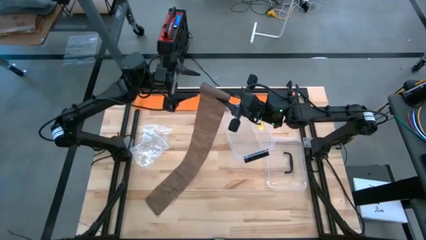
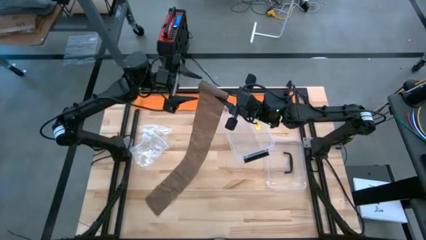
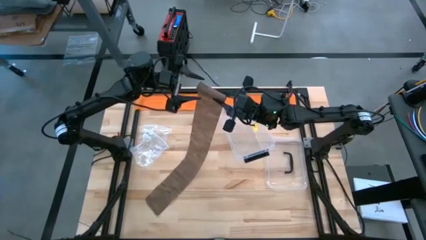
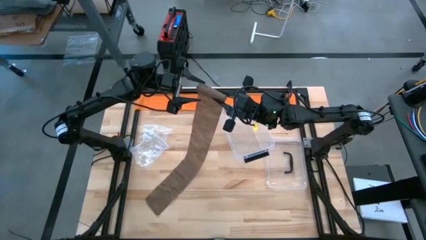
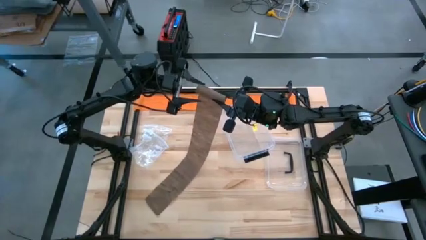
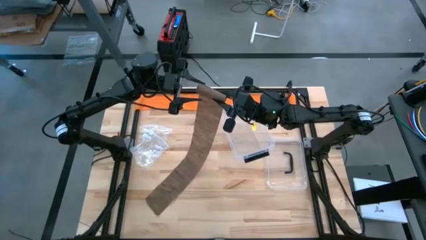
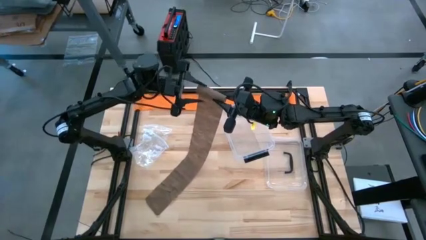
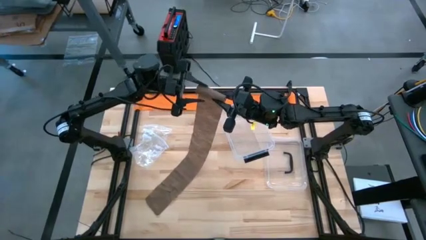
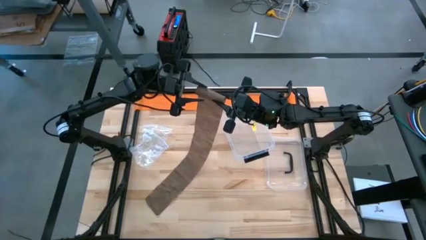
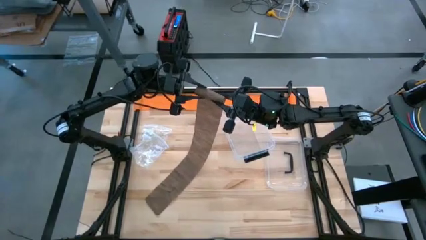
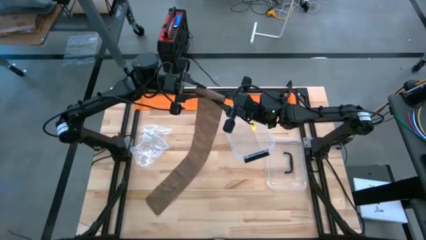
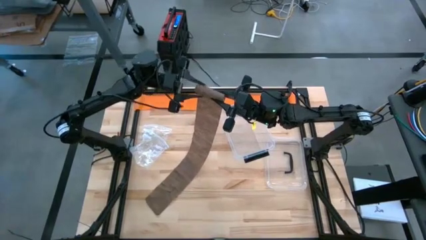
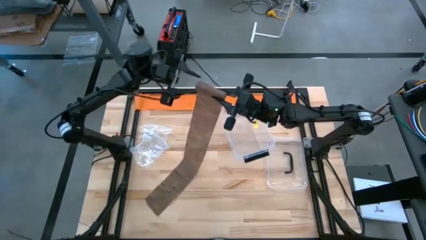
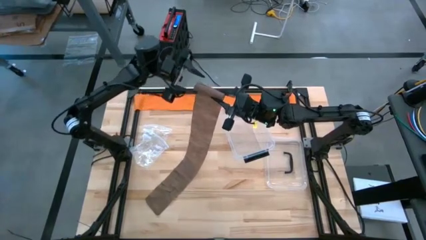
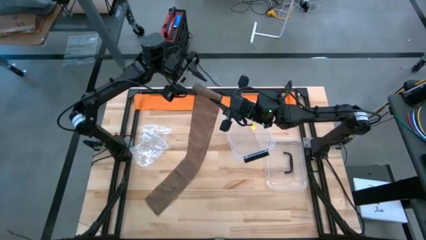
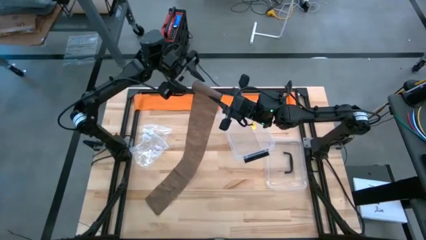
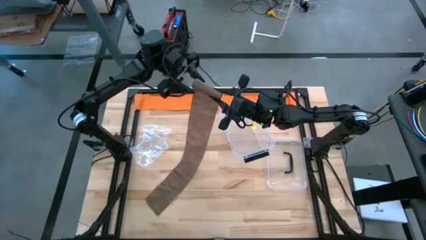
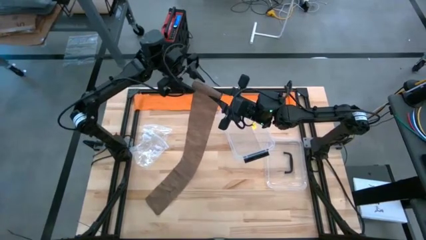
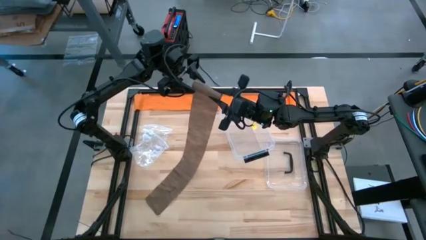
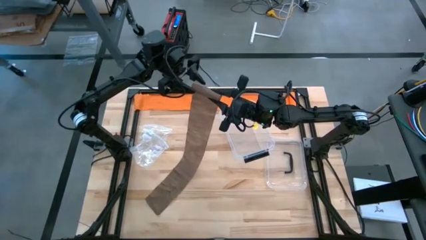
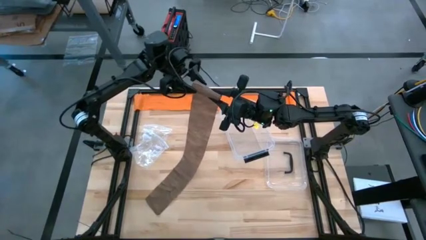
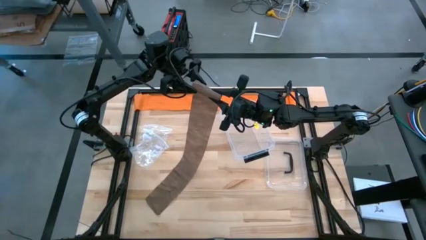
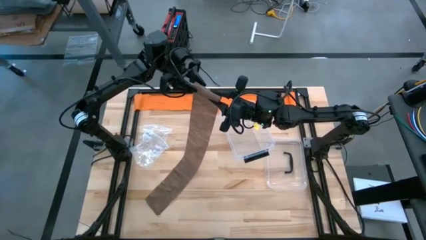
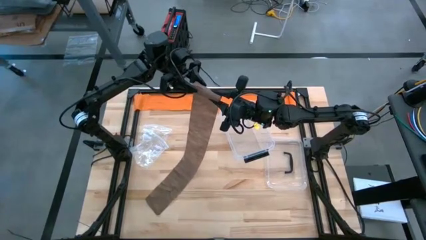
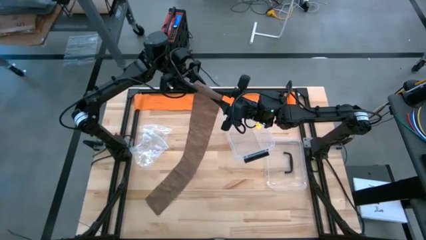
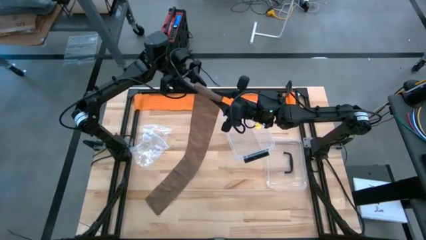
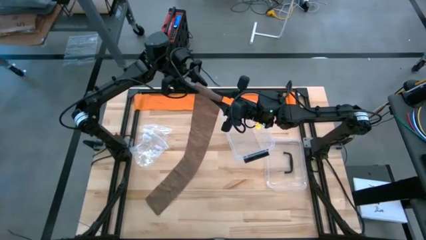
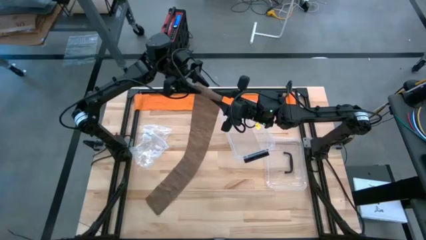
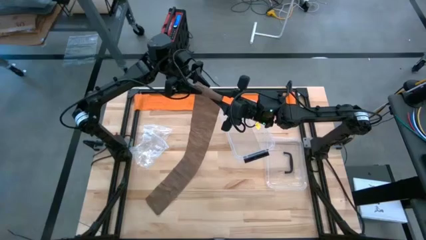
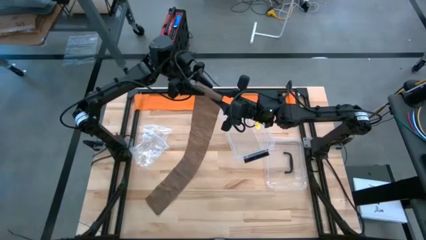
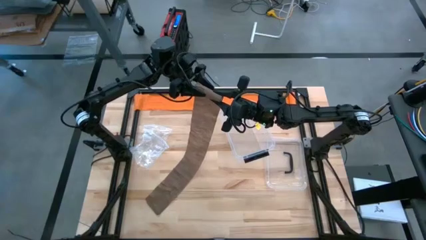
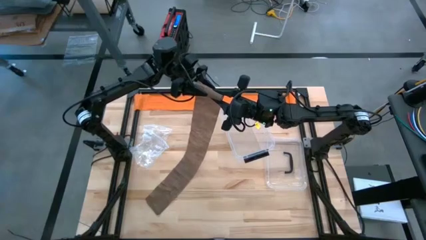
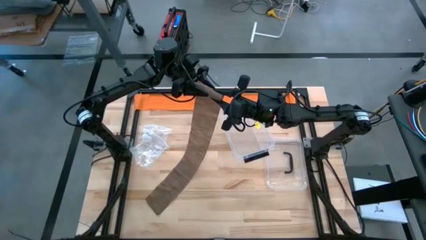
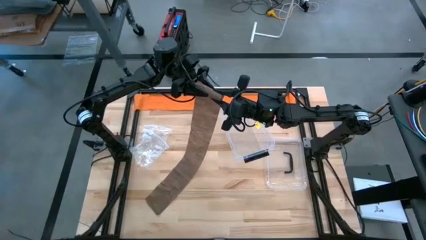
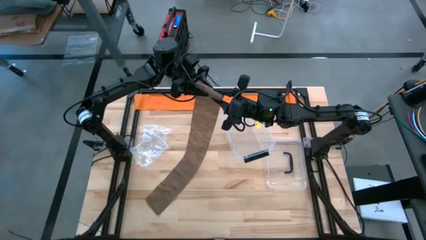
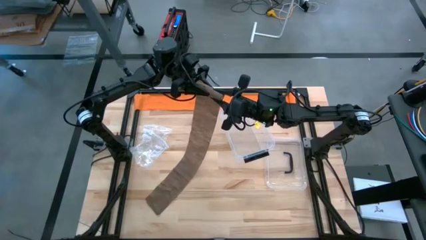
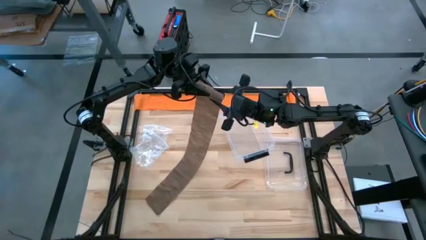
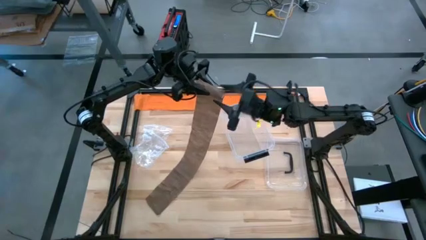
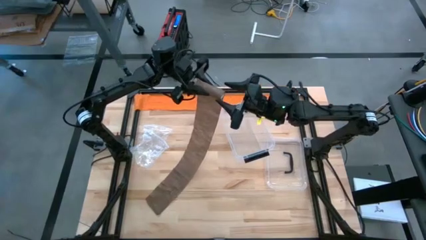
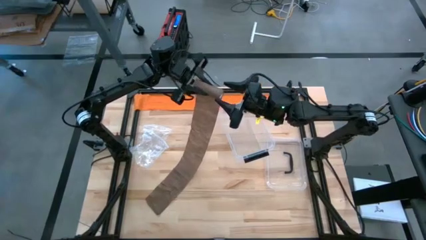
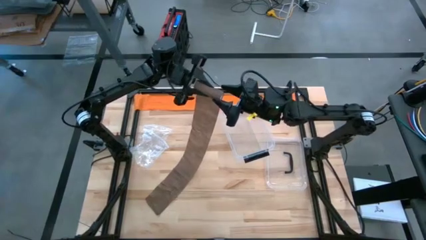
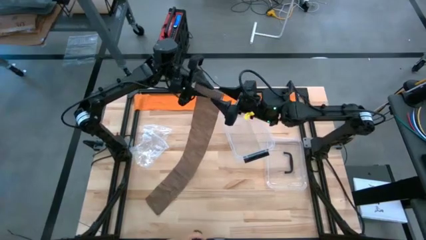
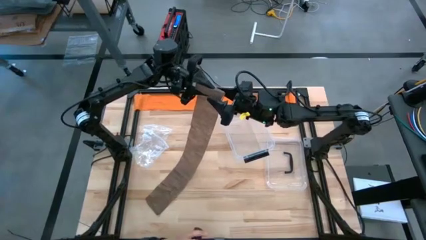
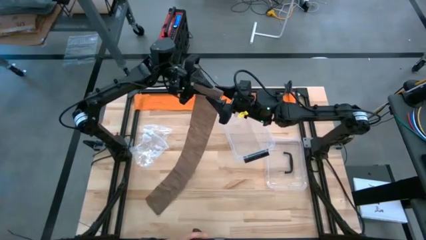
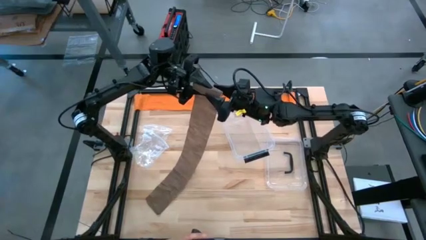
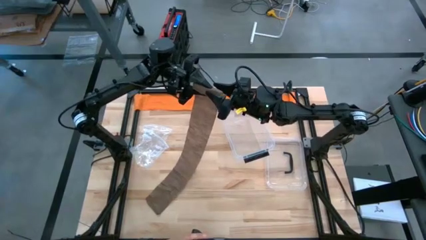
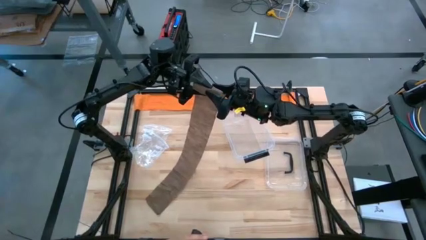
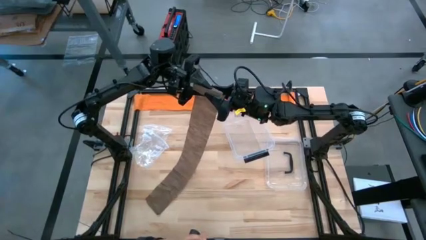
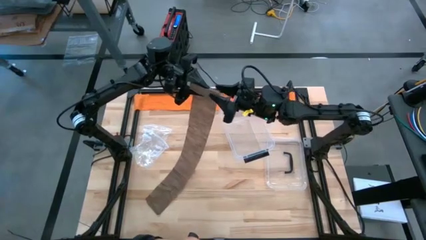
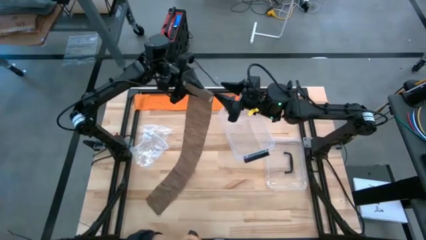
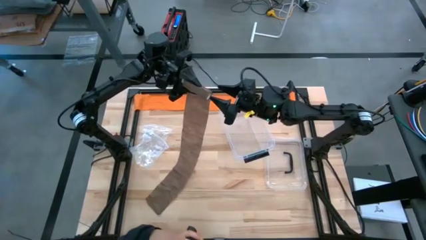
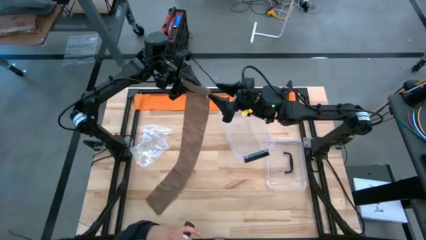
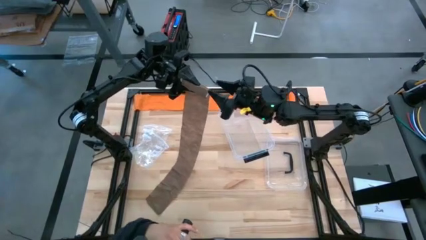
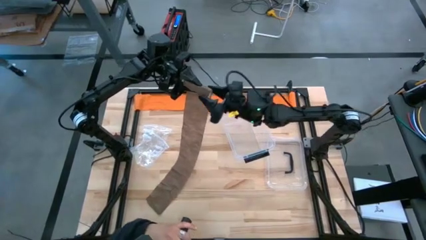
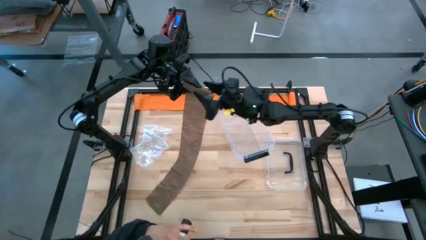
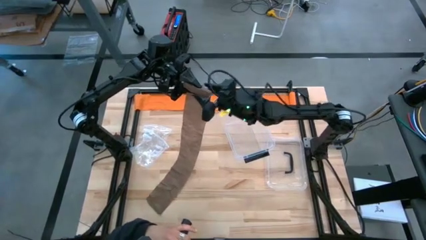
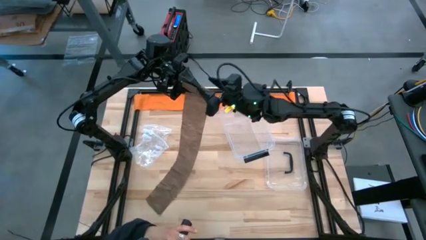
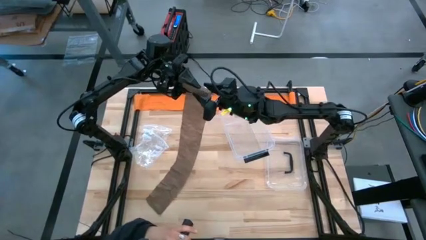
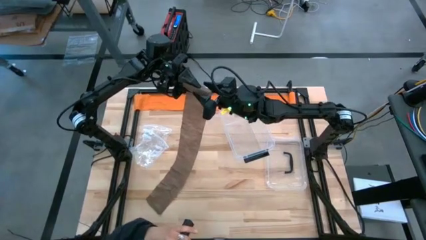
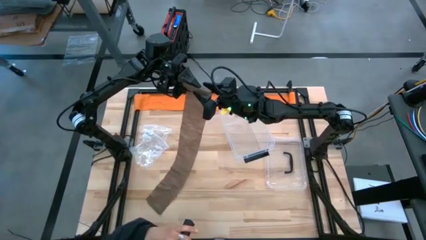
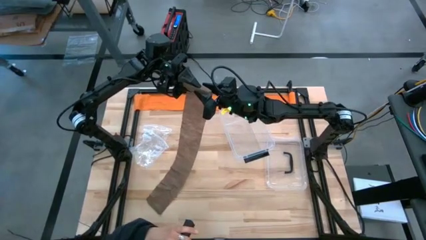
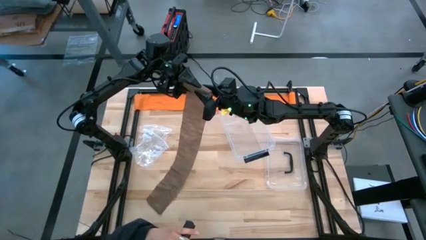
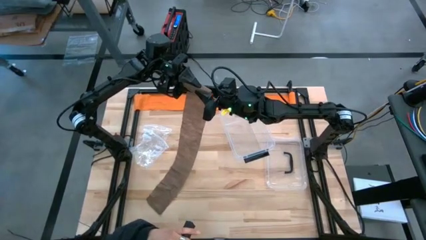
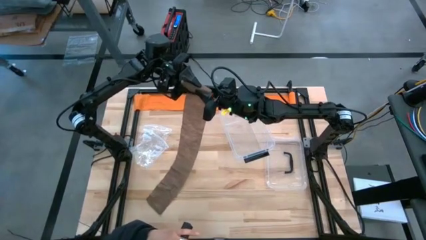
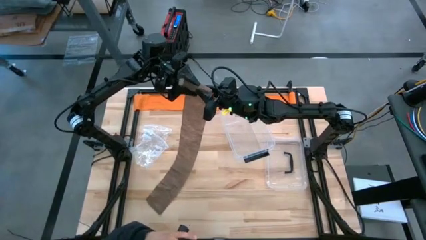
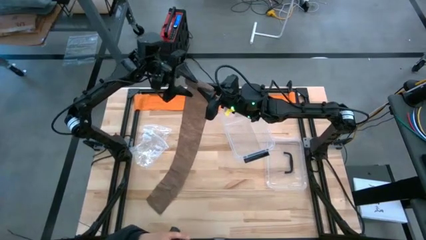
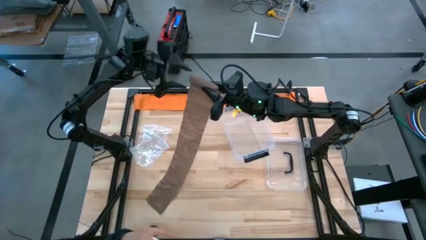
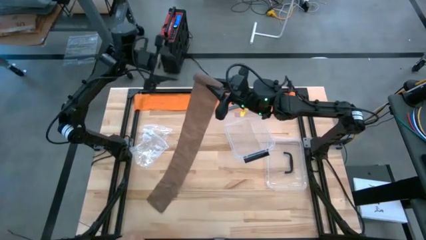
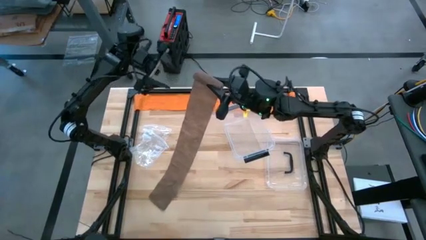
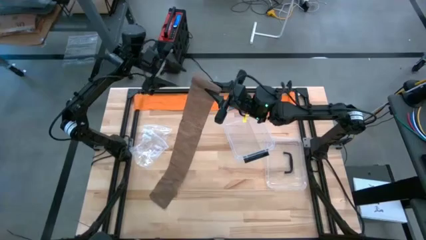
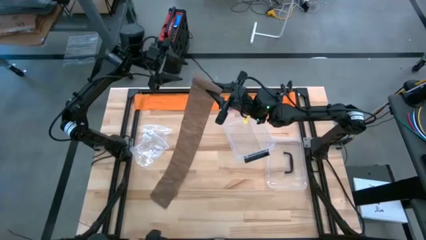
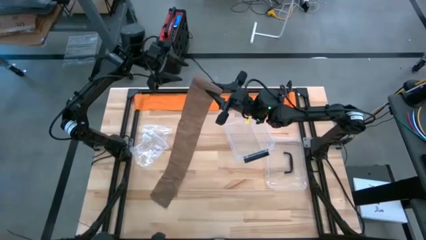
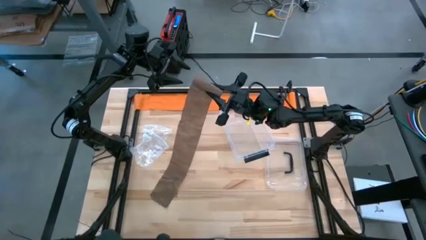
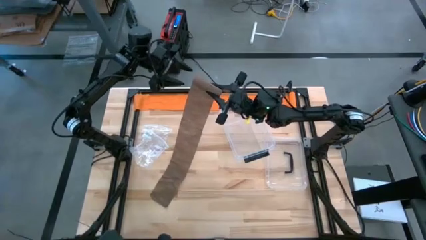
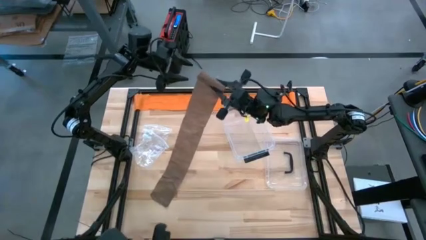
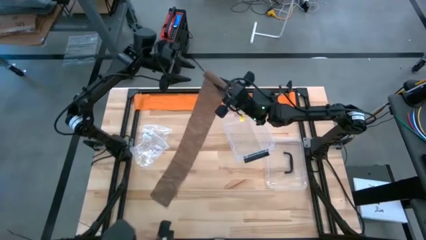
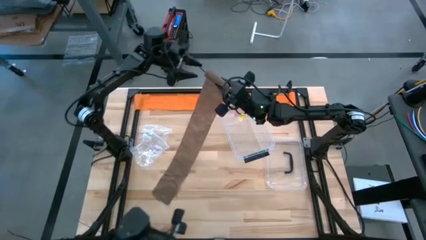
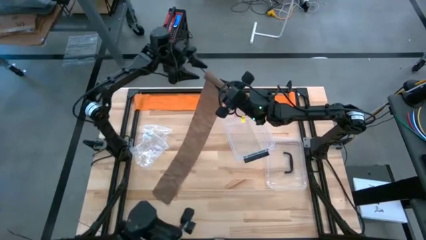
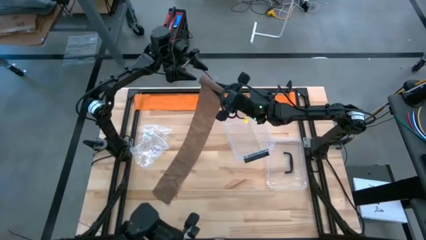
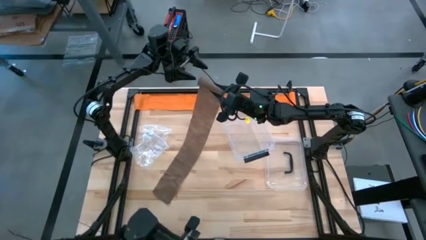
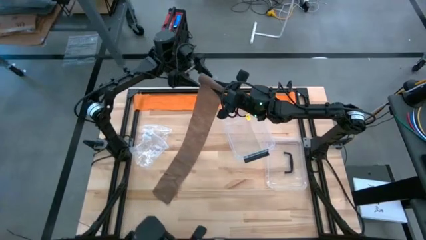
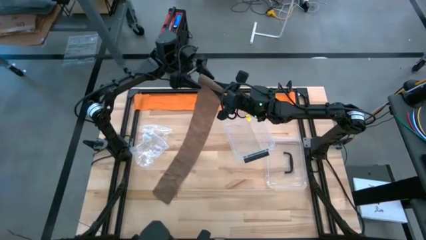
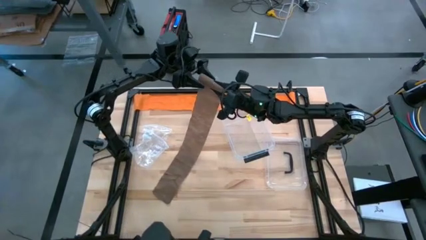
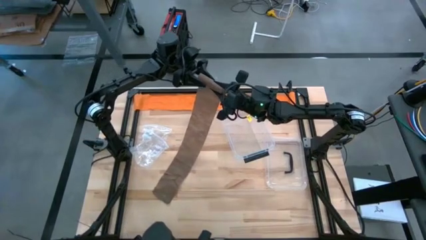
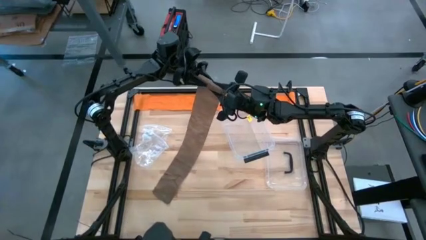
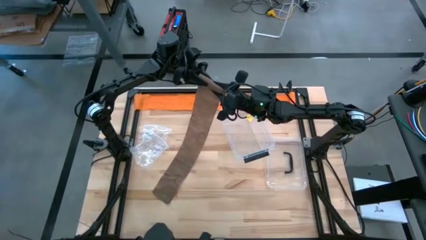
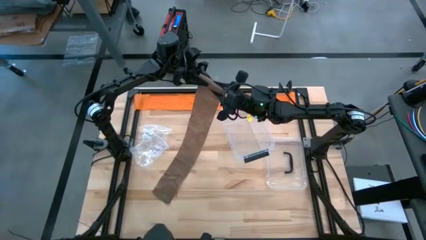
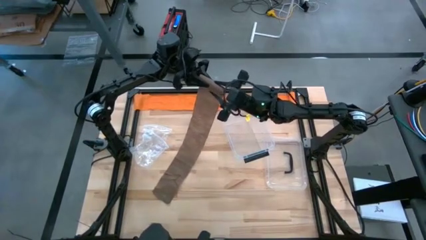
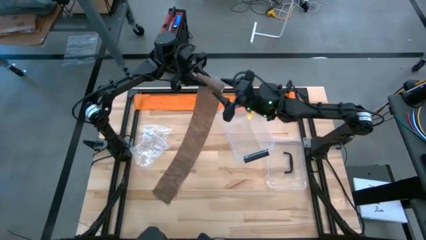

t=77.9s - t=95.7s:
Task: Roll bandage
Roll the brown bandage
